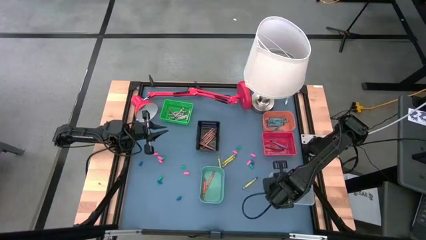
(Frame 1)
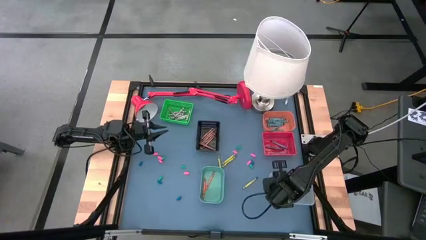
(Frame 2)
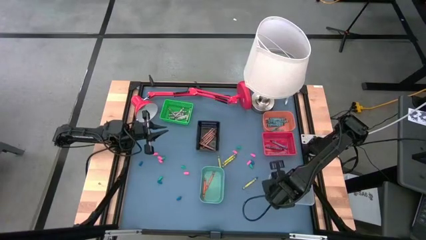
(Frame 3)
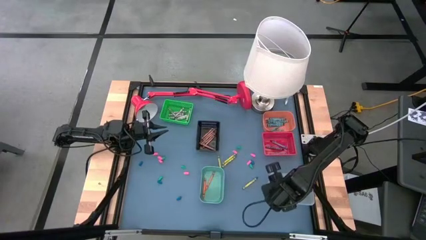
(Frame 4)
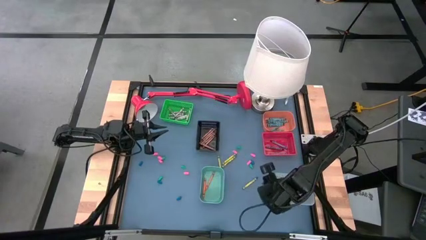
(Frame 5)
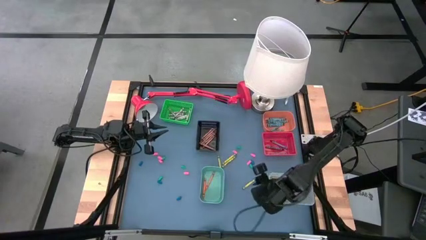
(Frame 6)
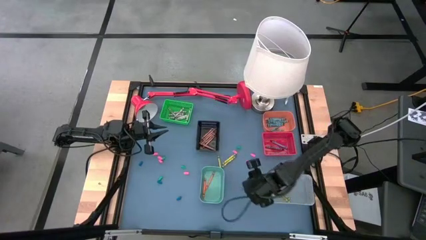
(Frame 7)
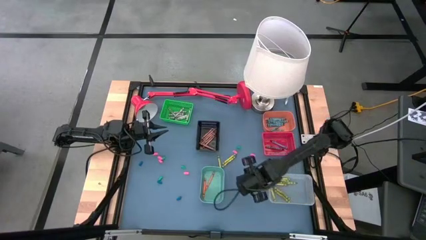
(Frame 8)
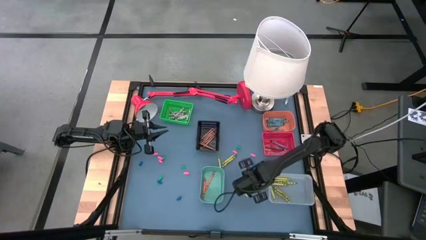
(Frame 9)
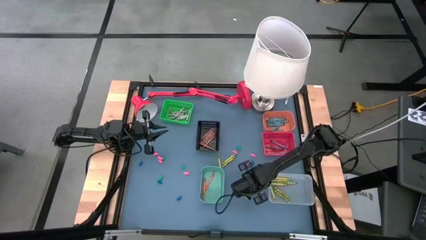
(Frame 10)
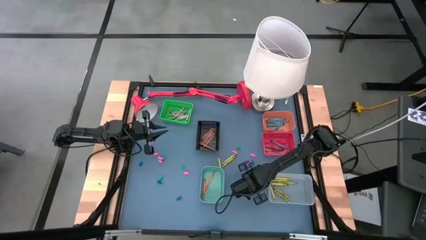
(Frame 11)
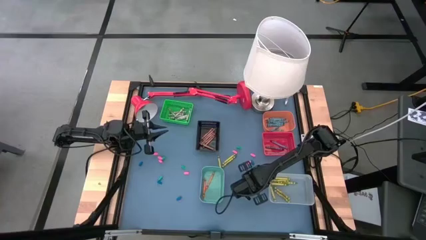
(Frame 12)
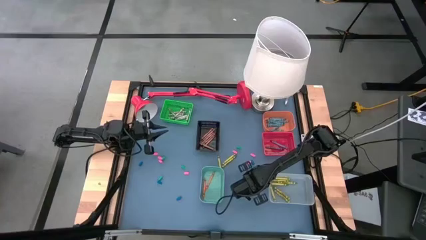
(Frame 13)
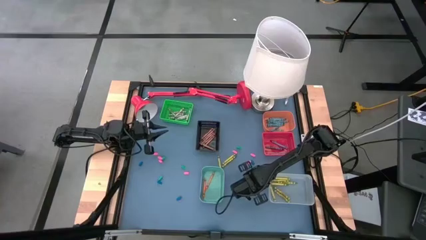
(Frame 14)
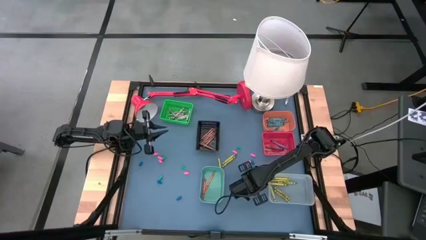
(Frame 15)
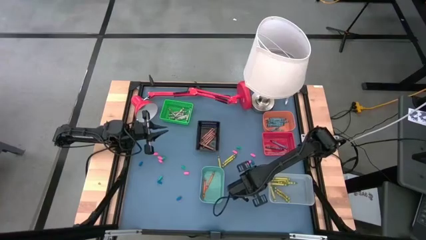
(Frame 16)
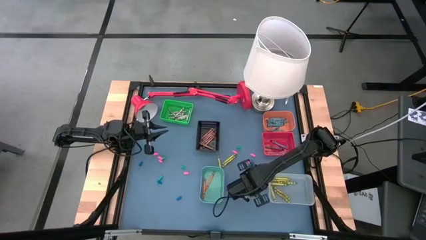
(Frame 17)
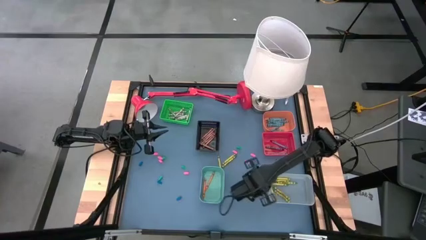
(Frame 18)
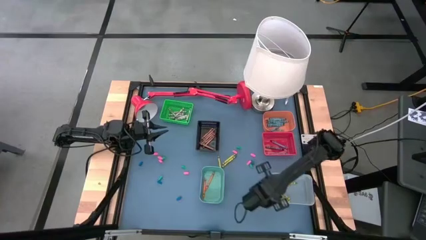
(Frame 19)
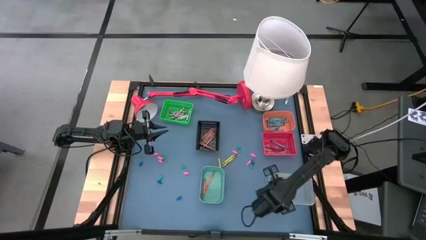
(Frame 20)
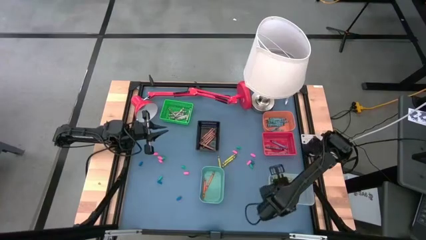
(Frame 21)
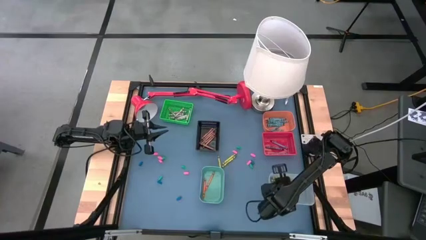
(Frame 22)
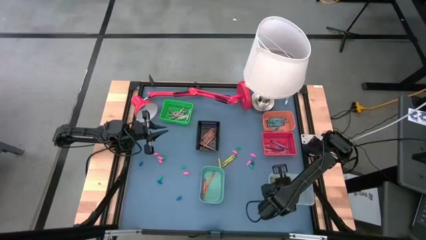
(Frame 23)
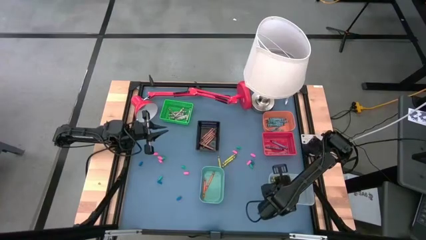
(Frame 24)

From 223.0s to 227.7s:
Task: Sort crayons
Put the green crayon into the transparent bin

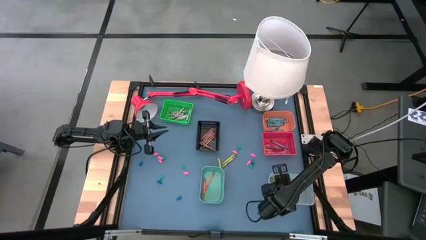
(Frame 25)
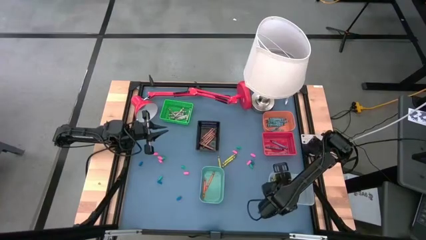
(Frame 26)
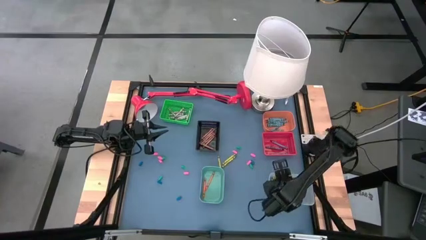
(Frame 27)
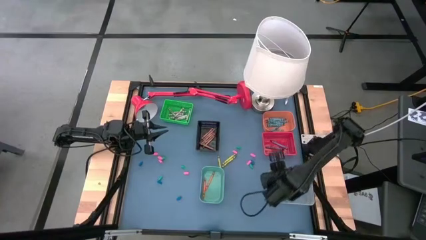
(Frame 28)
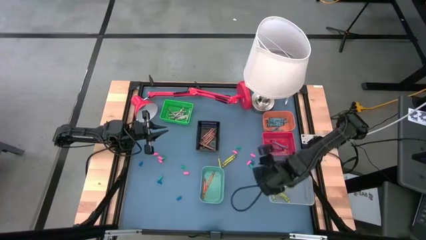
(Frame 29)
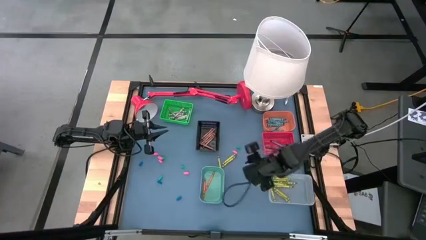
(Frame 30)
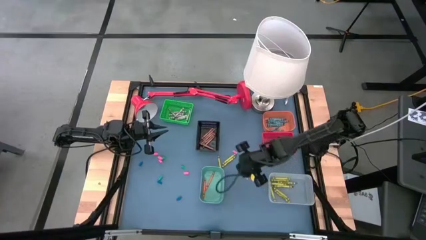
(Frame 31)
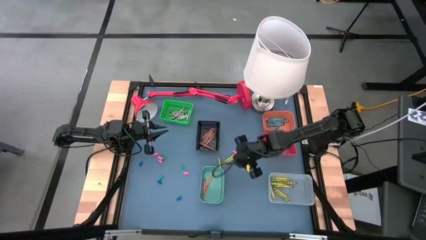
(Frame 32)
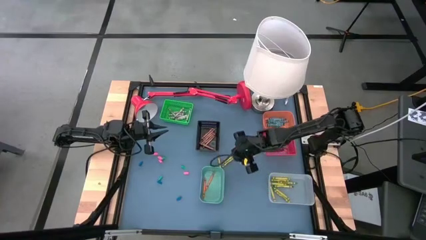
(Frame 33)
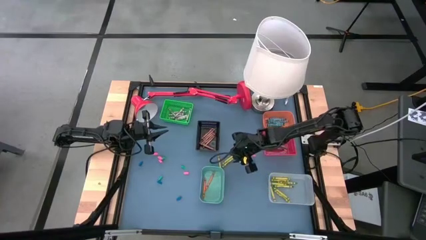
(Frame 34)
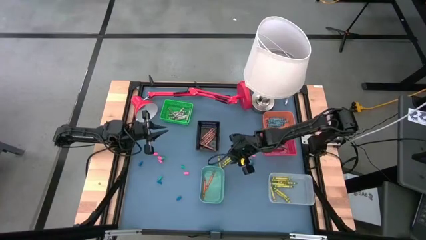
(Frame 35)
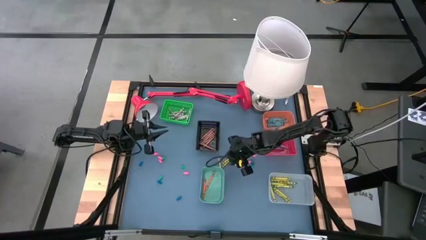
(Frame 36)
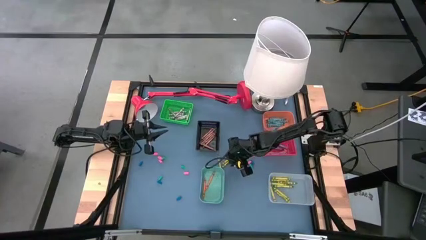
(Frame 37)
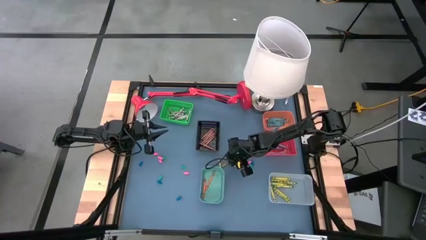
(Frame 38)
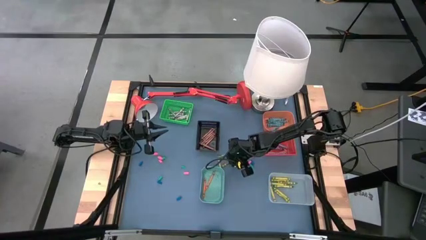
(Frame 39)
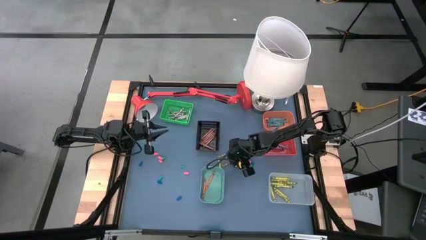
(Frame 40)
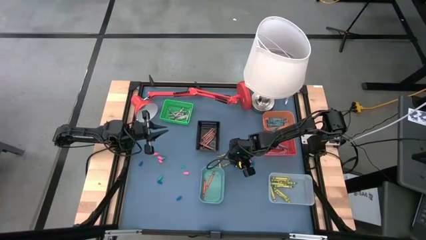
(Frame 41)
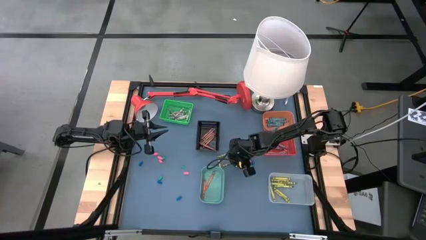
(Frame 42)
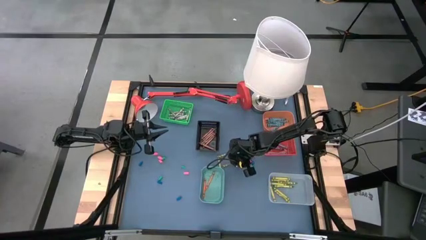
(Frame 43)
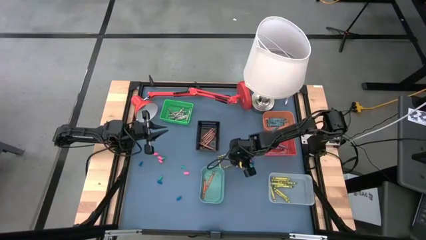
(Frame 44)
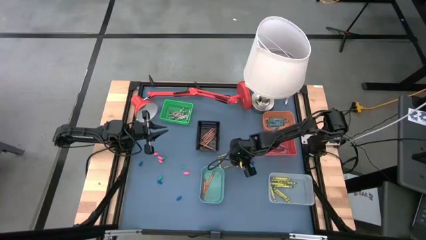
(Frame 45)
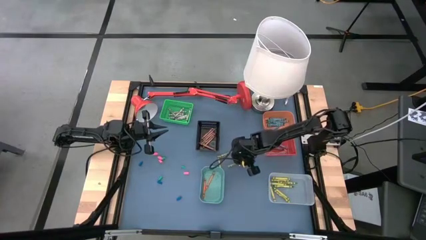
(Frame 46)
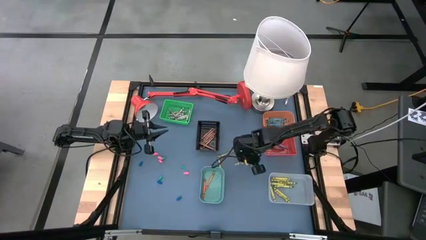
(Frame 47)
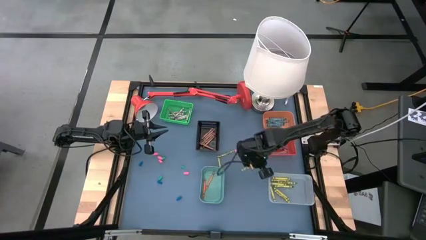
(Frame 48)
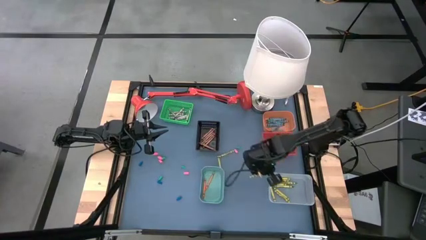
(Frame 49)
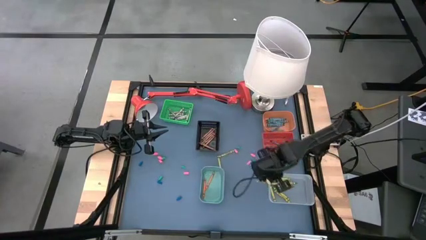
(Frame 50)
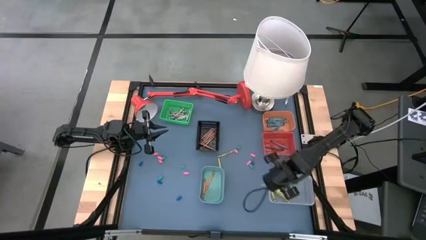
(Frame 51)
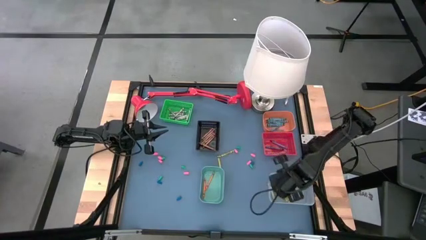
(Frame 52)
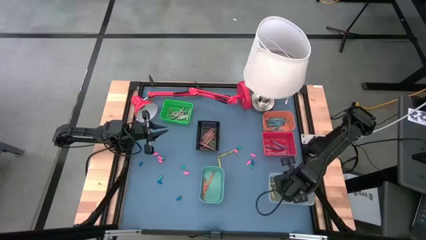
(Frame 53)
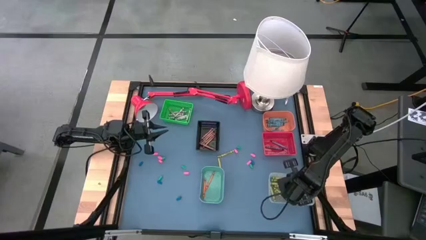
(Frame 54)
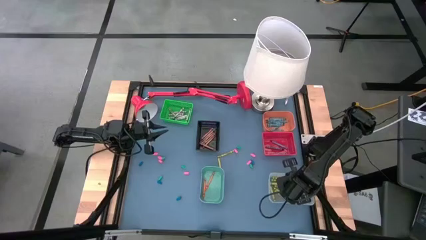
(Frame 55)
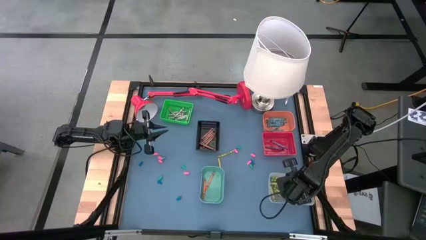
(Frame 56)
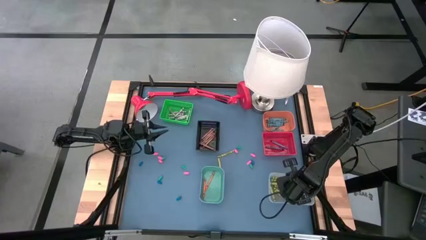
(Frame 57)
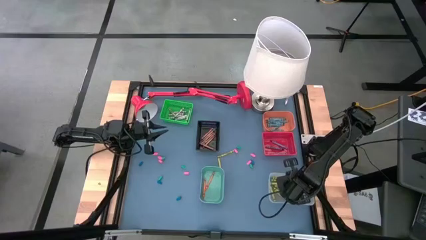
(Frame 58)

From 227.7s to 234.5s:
Put the green crayon into the transparent bin

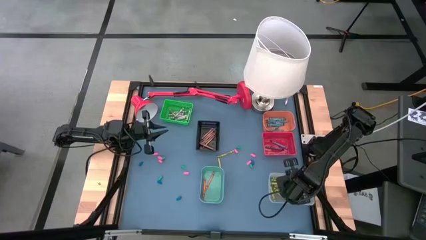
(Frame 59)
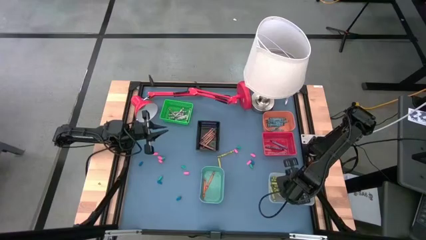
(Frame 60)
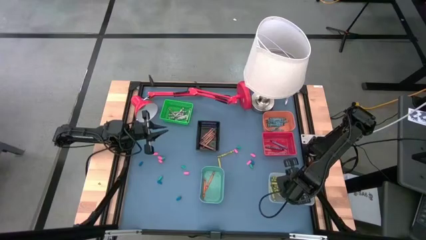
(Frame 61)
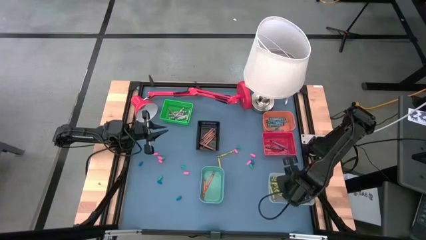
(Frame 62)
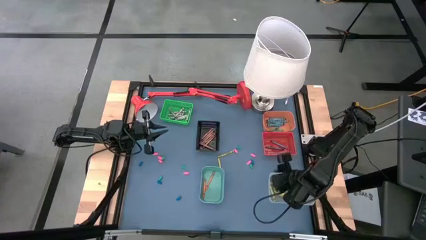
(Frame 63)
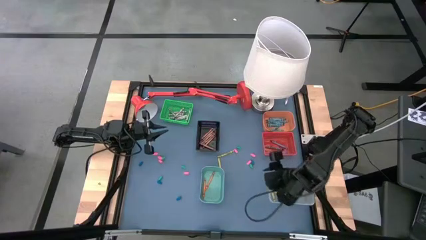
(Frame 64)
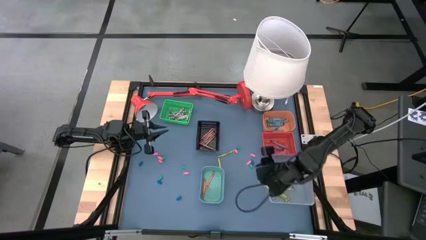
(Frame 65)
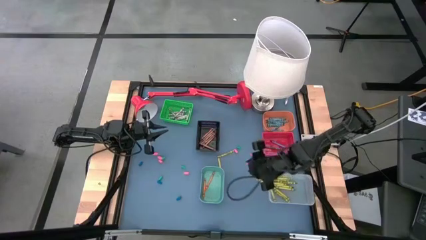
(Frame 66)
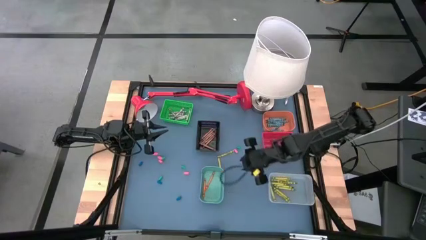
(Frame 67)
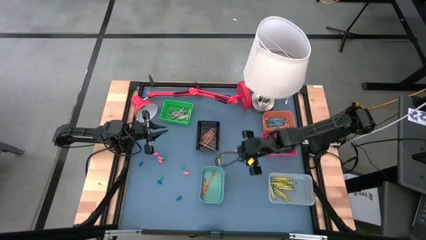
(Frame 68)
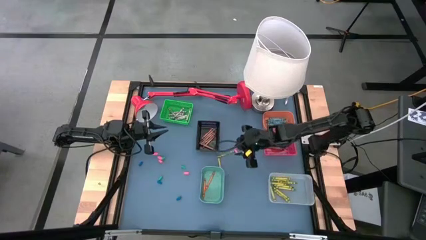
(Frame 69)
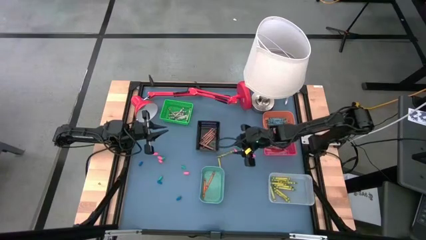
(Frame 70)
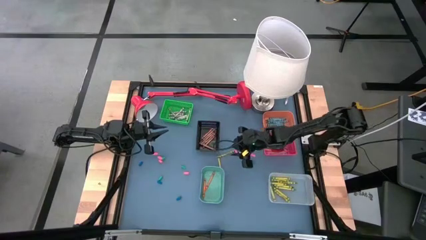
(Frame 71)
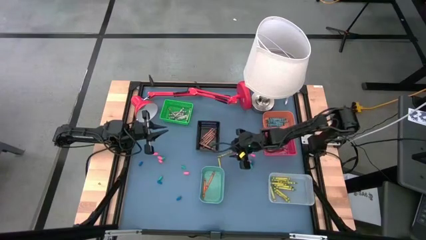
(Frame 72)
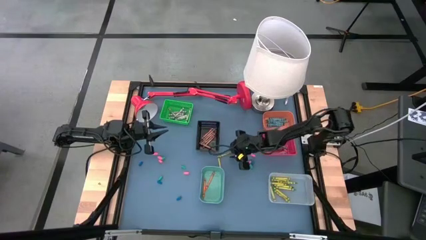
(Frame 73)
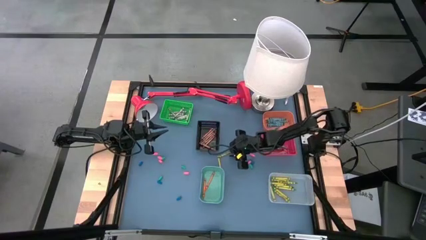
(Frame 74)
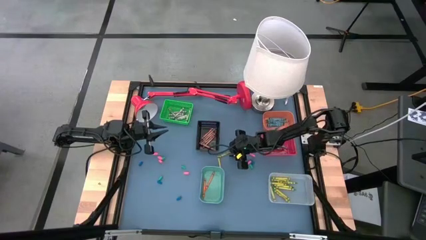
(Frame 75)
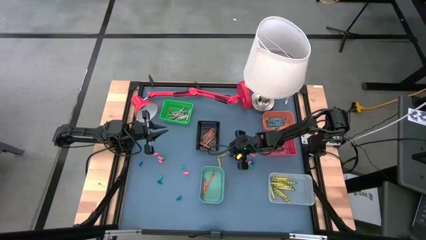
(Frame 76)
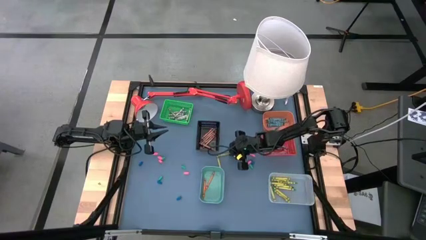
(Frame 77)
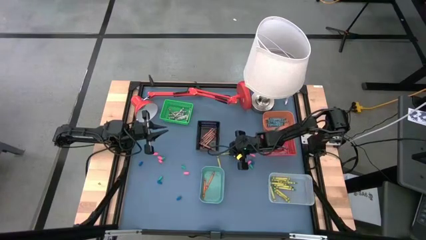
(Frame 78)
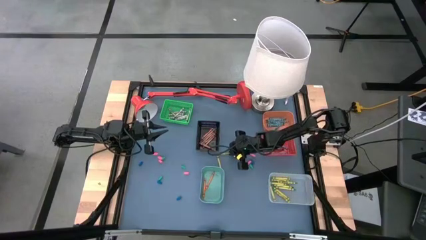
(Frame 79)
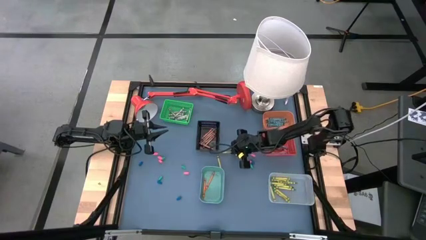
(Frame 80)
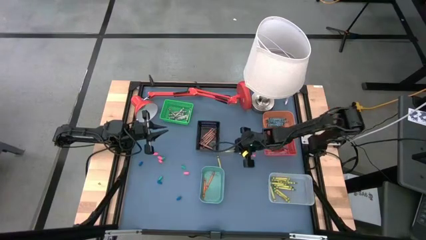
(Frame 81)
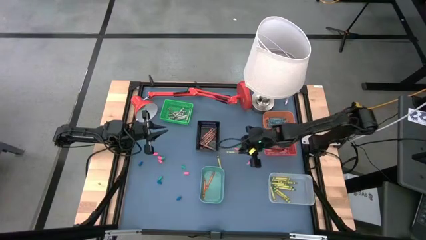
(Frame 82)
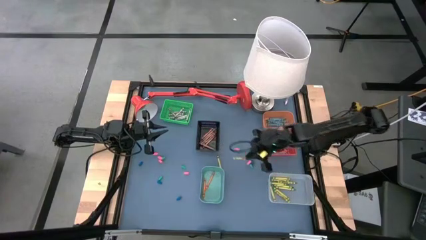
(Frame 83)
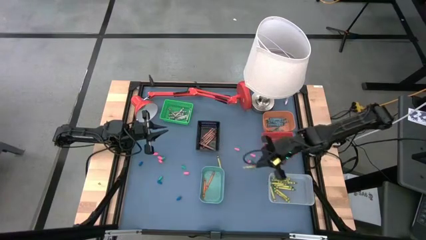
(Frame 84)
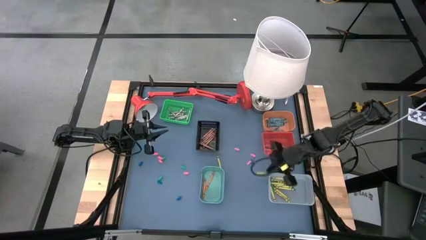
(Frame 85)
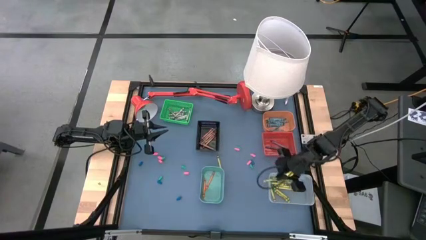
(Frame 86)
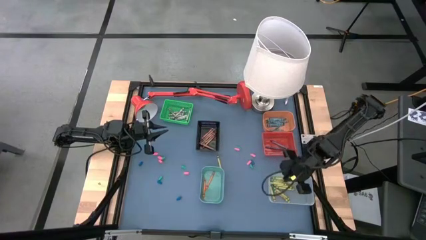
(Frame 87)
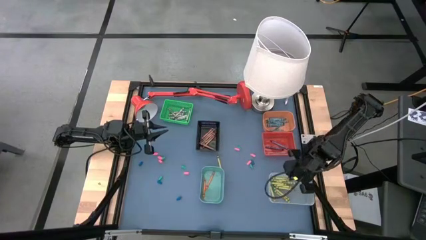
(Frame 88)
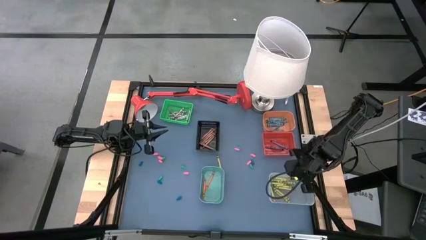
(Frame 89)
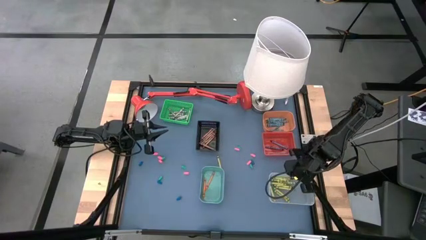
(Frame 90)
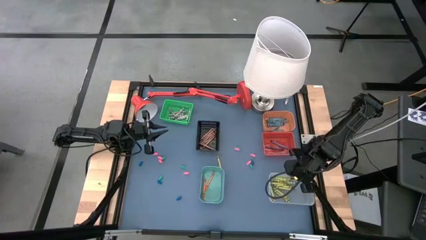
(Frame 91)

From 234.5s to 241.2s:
Put the green crayon into the transparent bin
